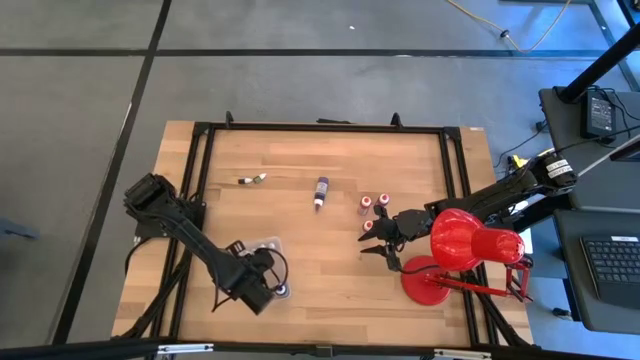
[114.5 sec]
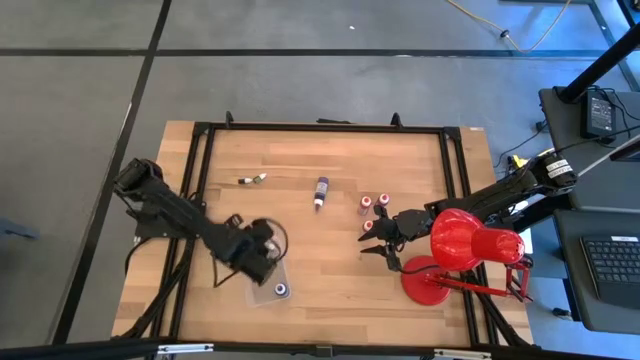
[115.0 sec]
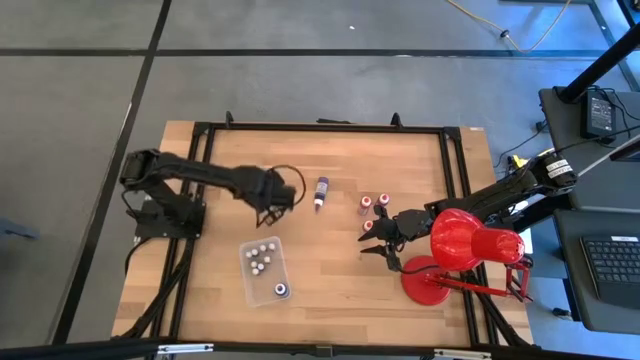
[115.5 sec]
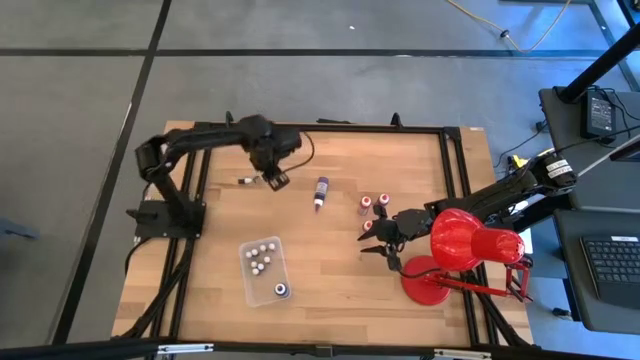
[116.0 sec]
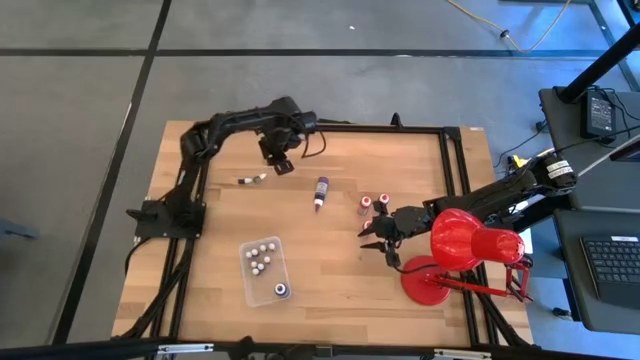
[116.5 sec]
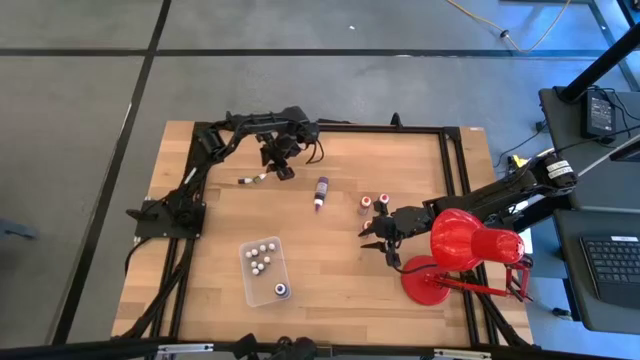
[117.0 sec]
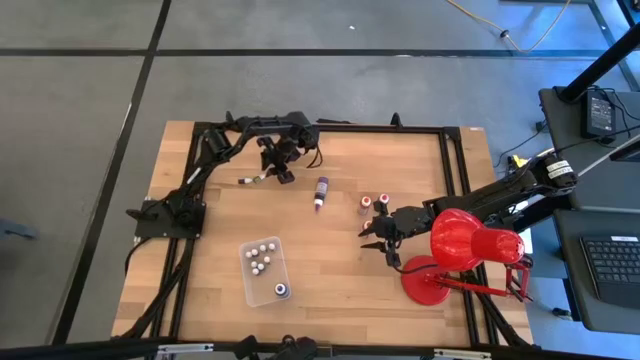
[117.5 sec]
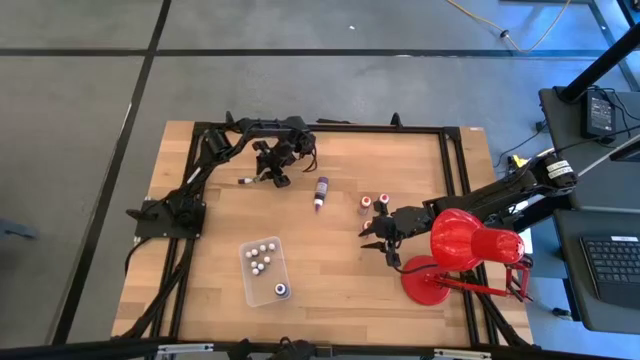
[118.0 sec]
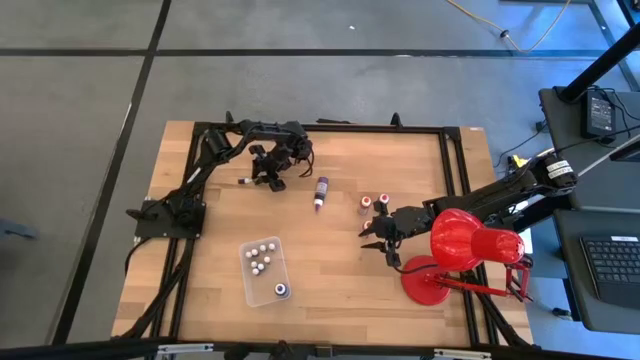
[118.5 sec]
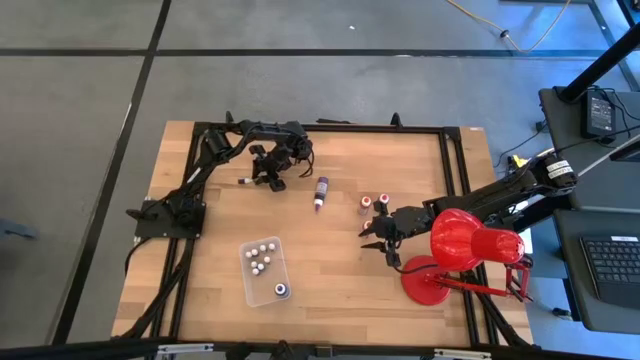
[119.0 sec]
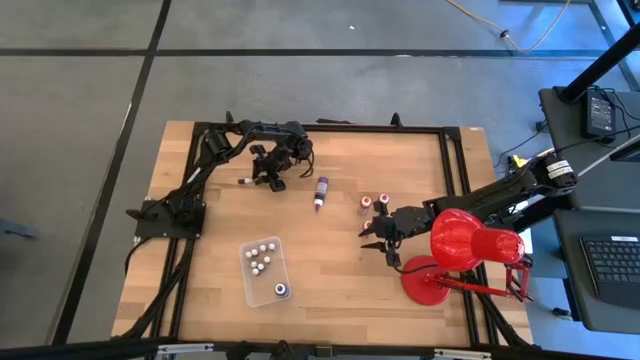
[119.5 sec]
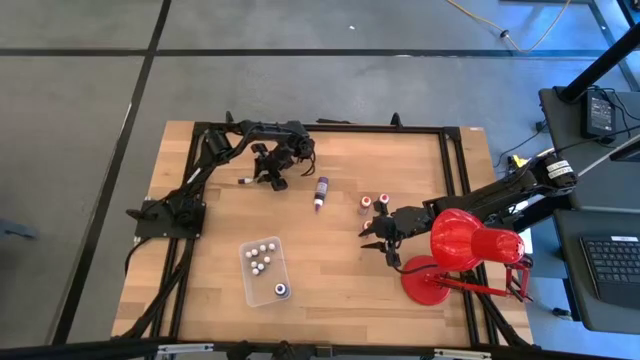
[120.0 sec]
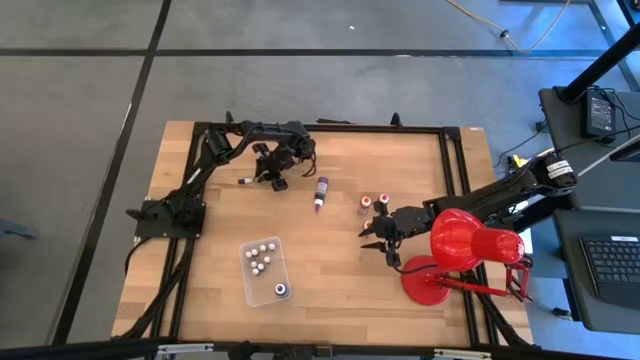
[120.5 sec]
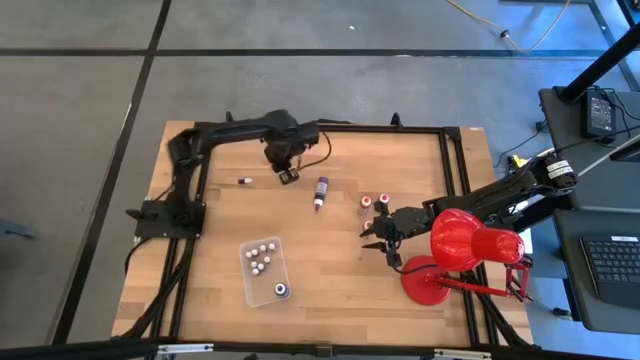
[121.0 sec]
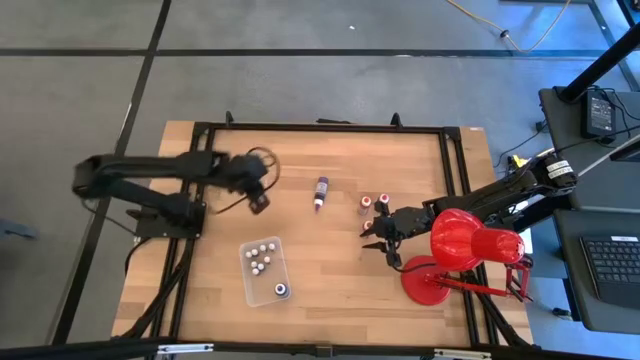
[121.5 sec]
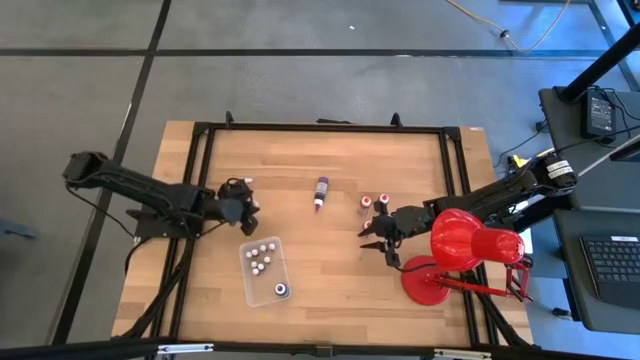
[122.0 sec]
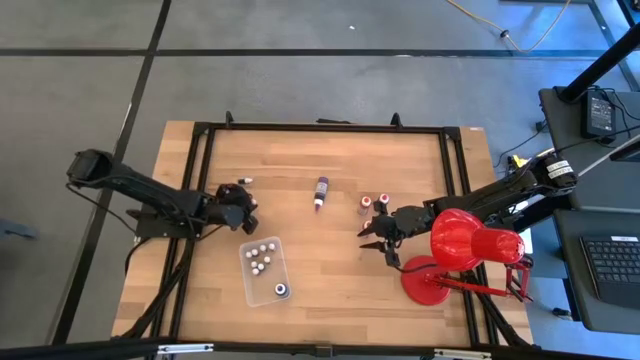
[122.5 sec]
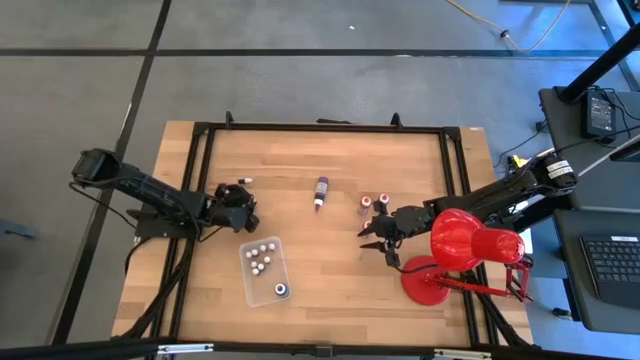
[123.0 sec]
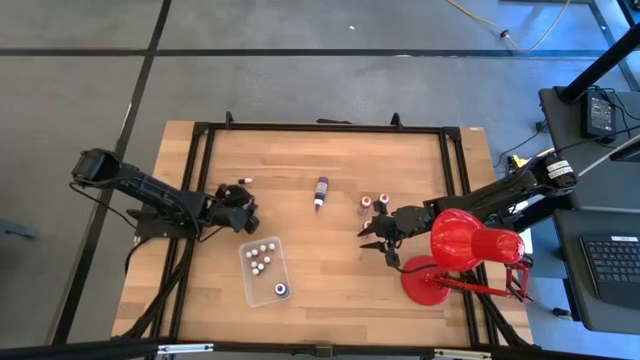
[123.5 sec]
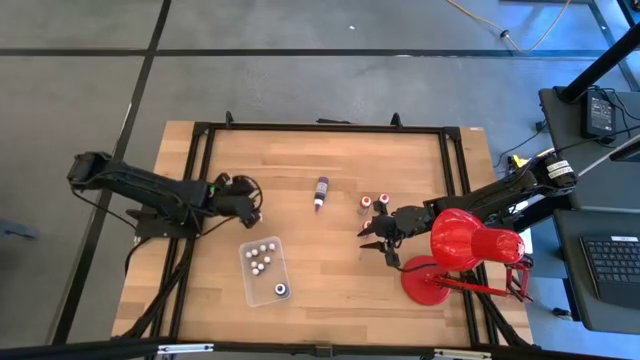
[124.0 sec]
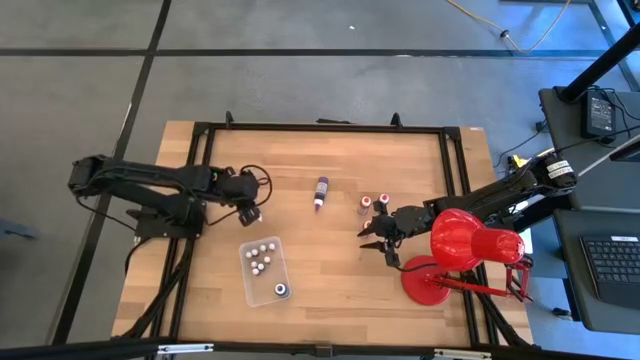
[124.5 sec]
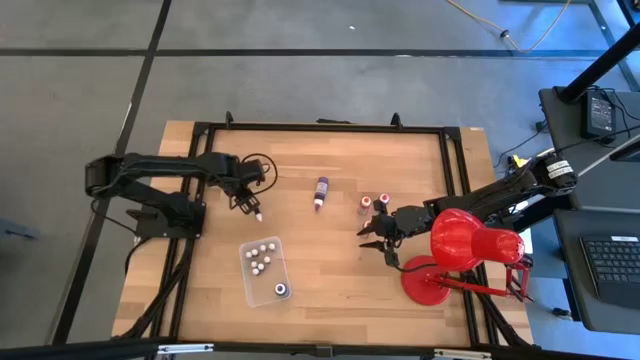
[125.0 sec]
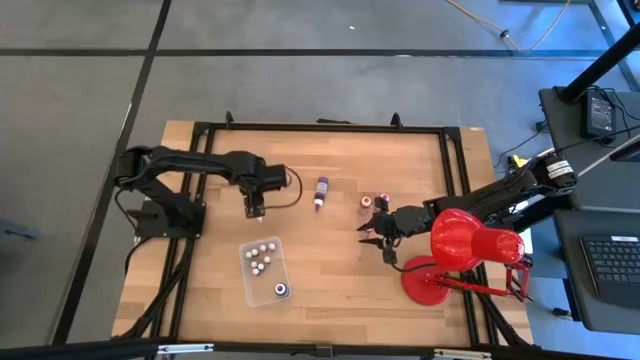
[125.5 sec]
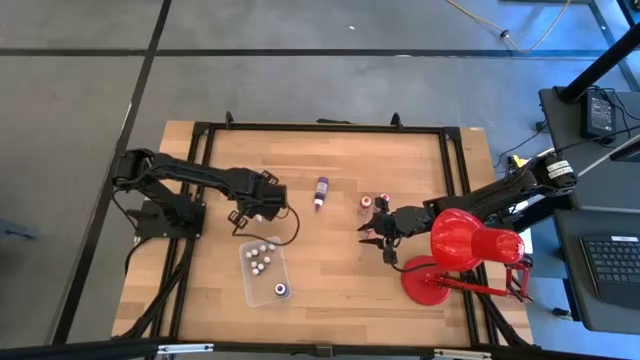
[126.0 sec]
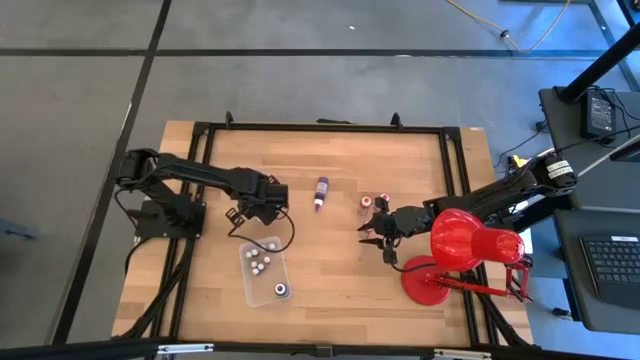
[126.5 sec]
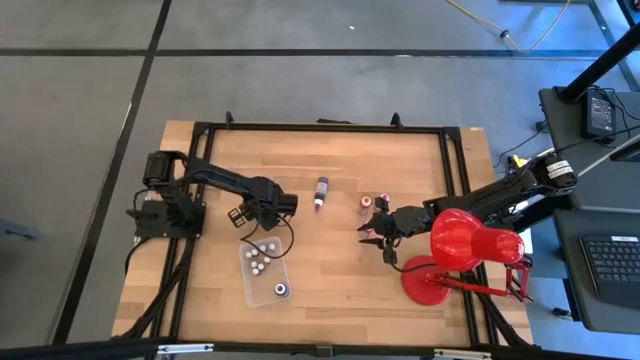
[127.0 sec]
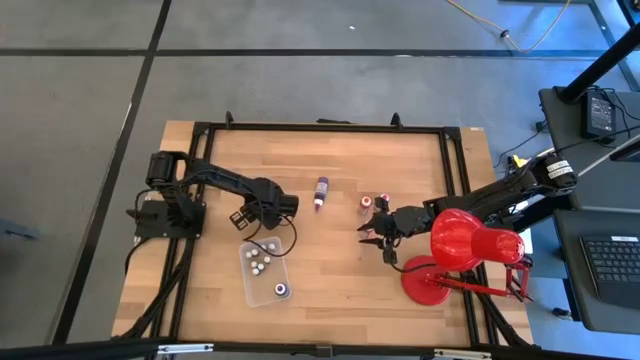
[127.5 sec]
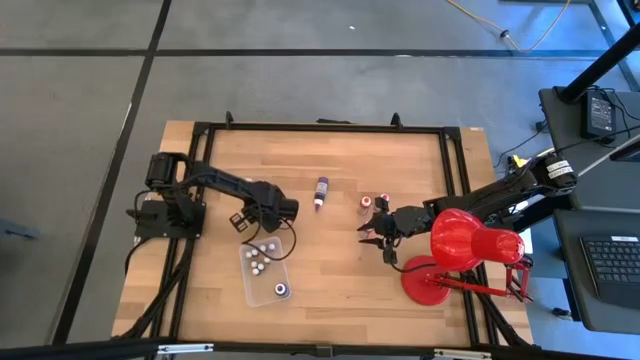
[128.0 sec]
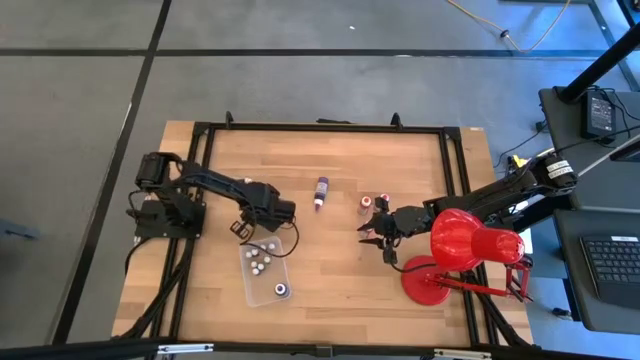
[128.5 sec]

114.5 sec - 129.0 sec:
Task: Pick & Place food coloring
Put the small green food coloring bottle into the bin

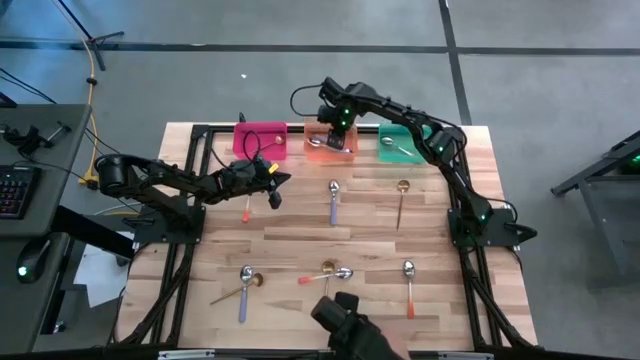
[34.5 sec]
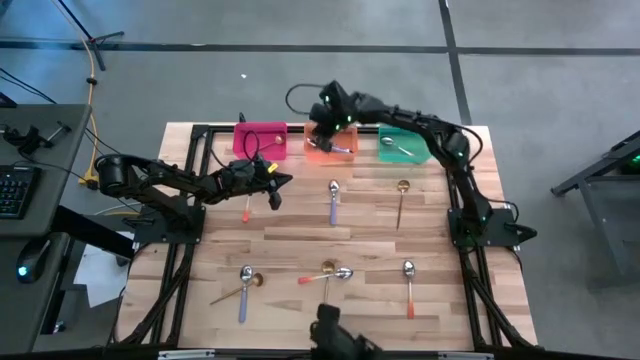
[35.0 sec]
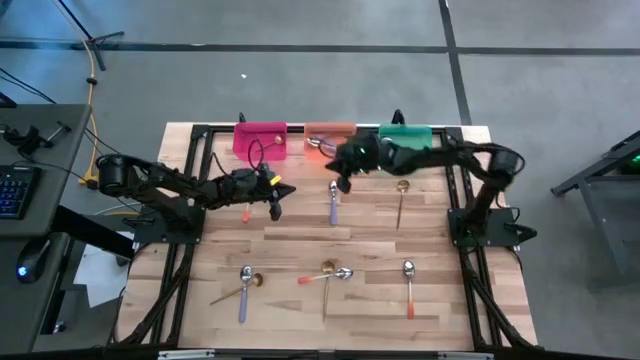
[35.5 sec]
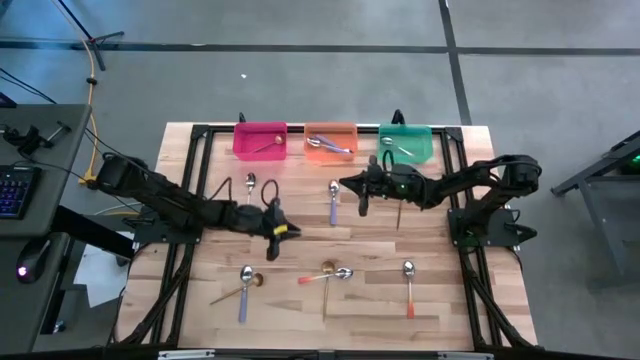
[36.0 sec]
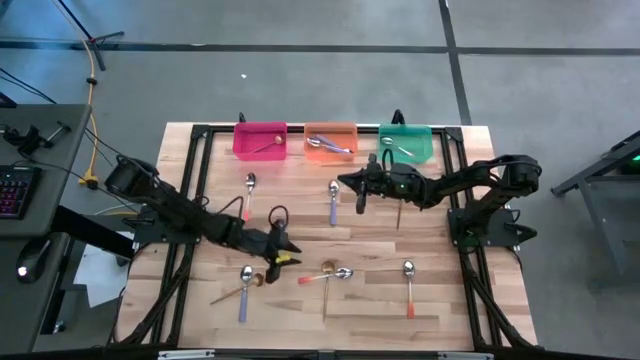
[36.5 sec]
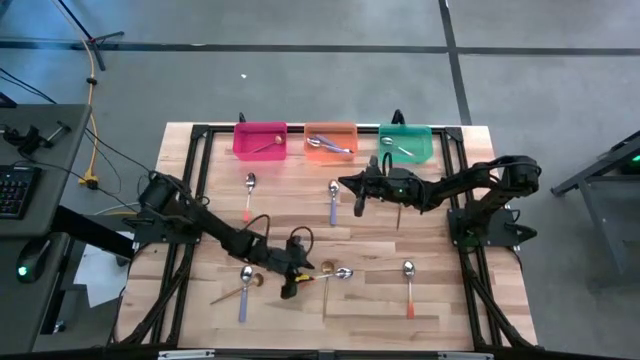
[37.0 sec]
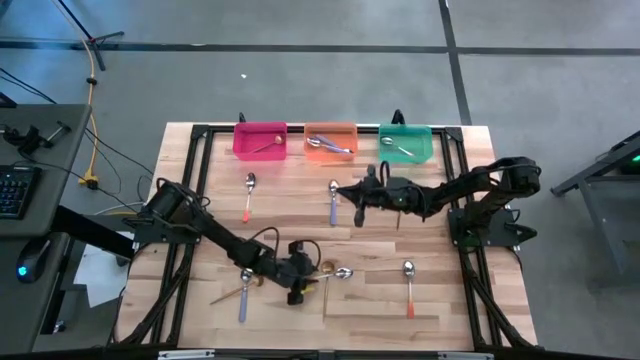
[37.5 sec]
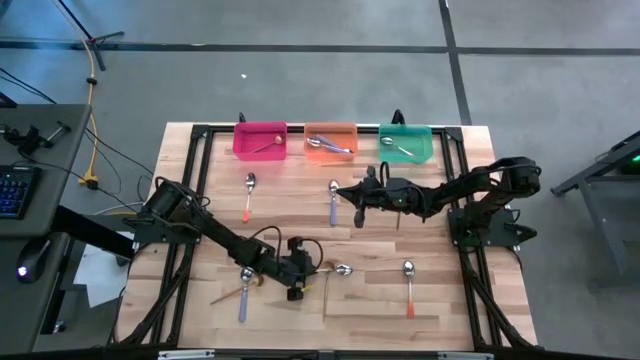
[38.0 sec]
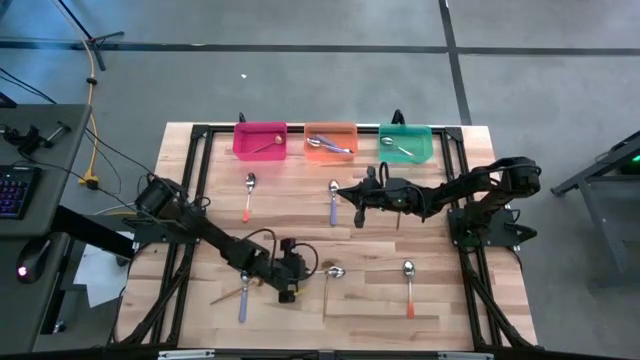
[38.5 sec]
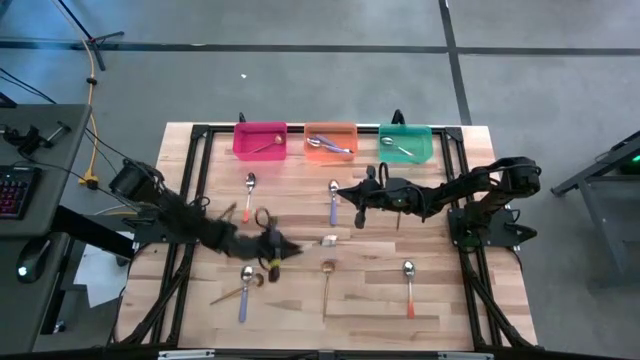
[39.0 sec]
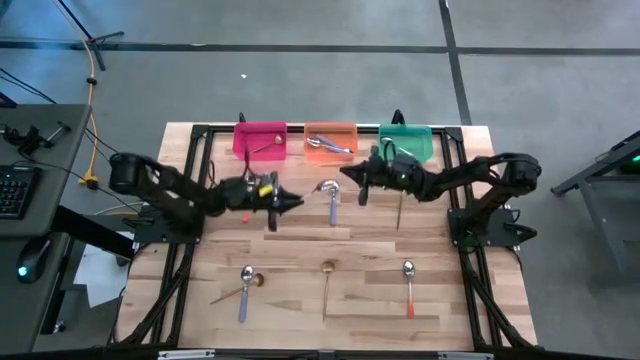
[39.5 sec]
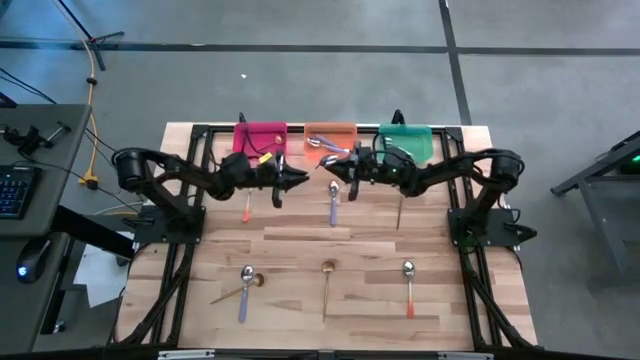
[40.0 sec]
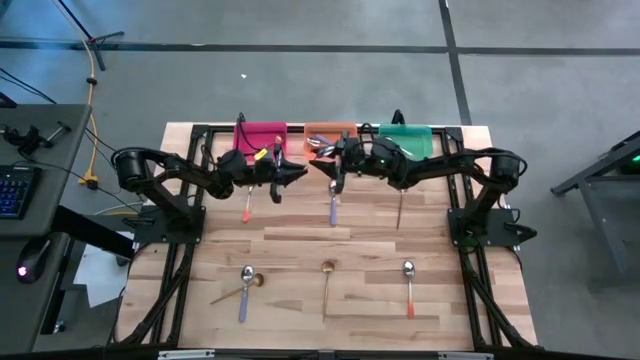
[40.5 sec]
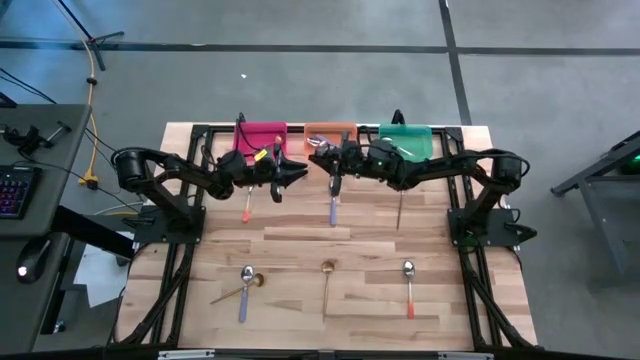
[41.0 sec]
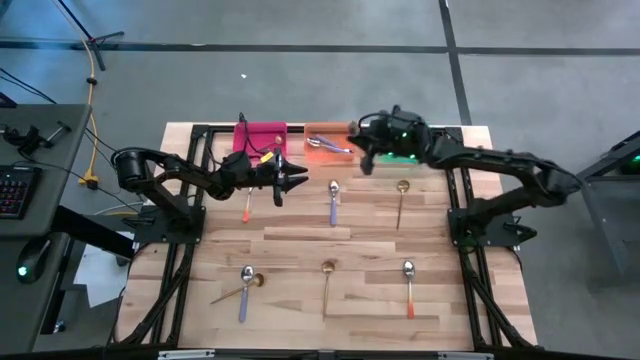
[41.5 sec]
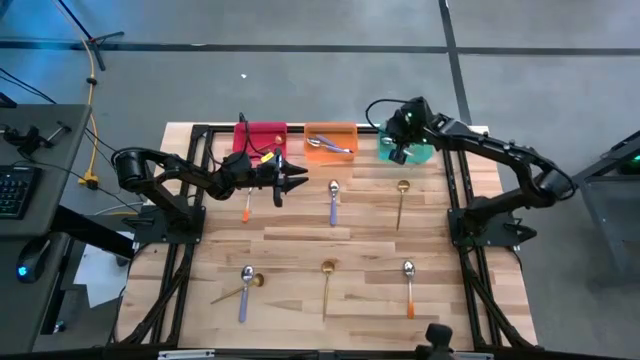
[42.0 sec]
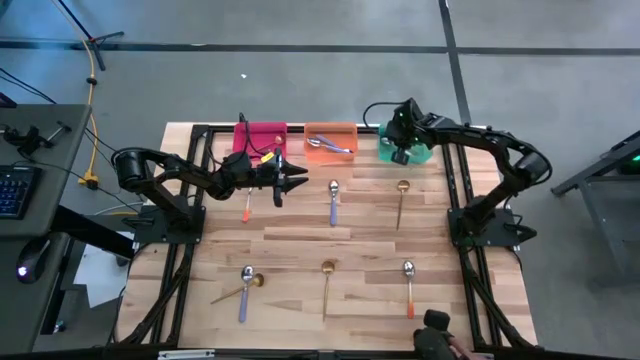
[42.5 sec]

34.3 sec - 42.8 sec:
Task: Sort silverware by color (type)
Put the bottom left orange spoon into the green bin
